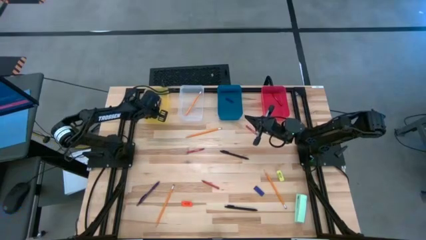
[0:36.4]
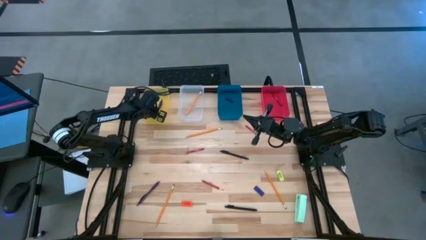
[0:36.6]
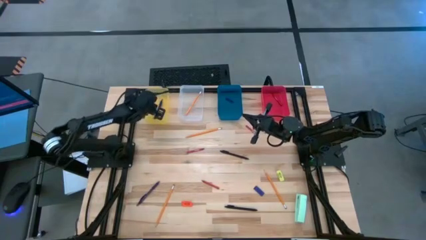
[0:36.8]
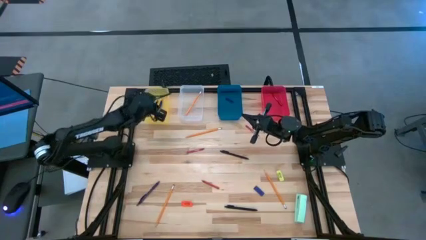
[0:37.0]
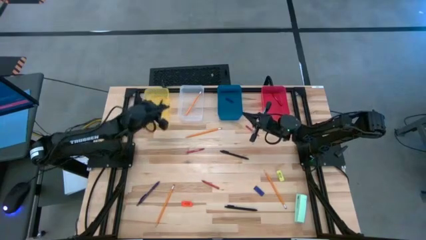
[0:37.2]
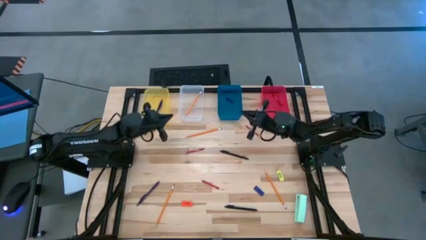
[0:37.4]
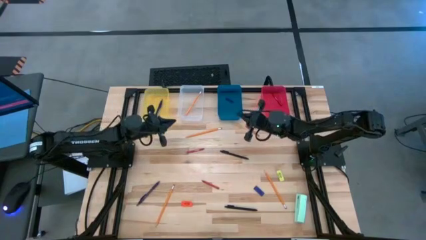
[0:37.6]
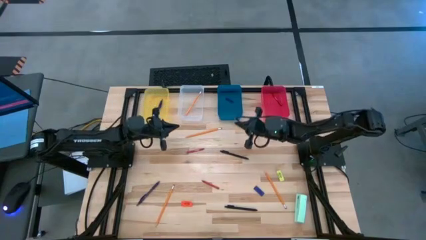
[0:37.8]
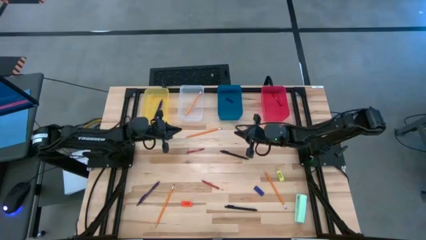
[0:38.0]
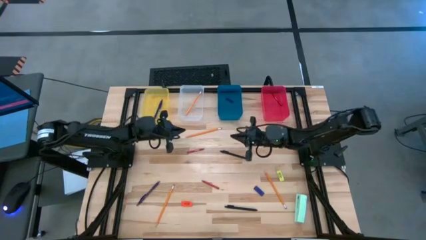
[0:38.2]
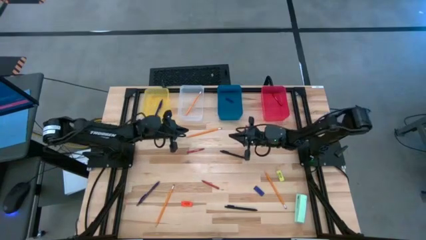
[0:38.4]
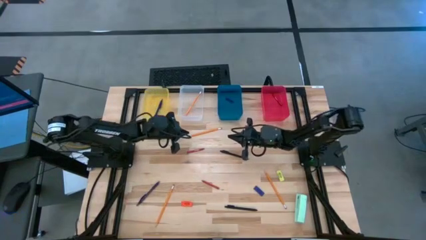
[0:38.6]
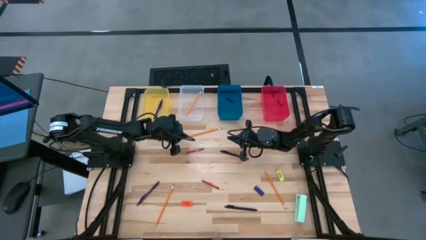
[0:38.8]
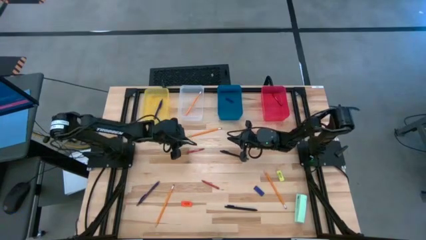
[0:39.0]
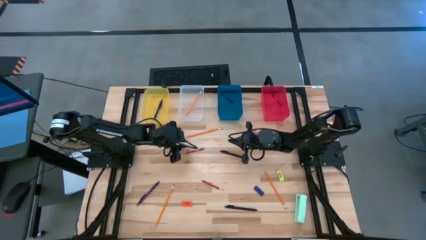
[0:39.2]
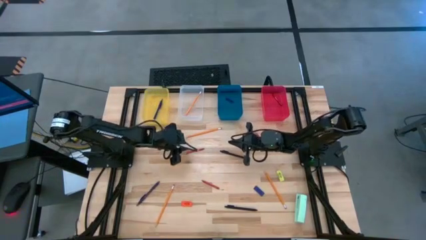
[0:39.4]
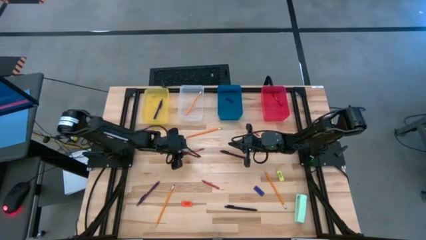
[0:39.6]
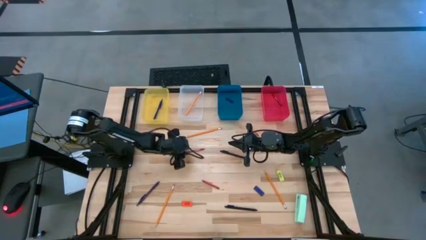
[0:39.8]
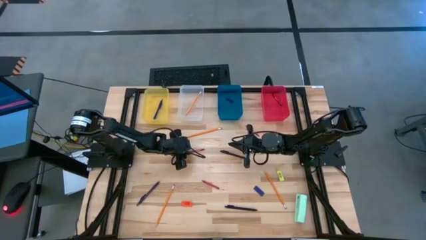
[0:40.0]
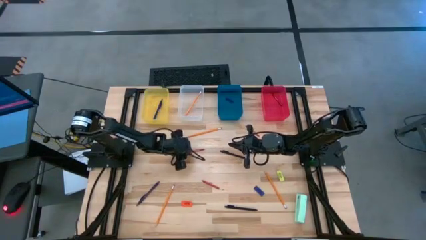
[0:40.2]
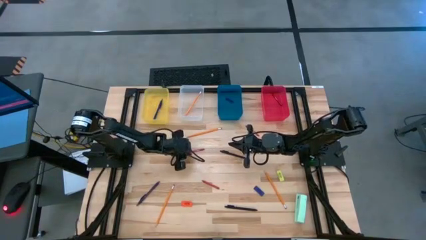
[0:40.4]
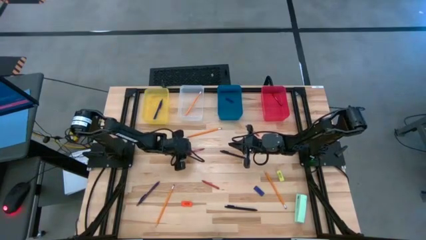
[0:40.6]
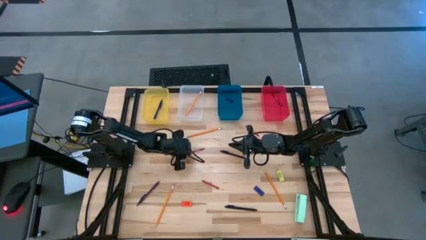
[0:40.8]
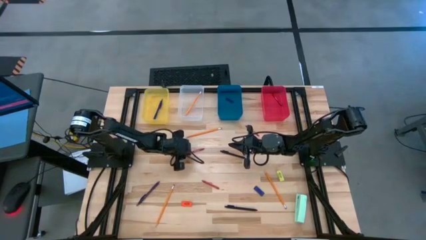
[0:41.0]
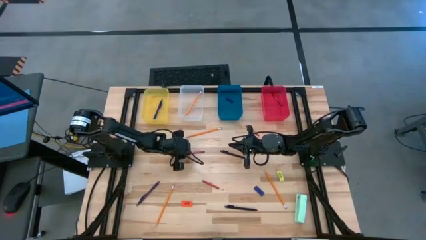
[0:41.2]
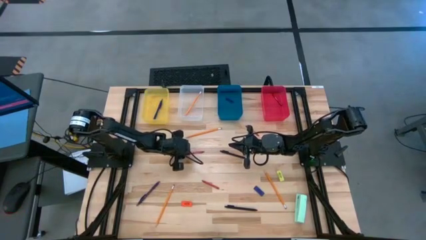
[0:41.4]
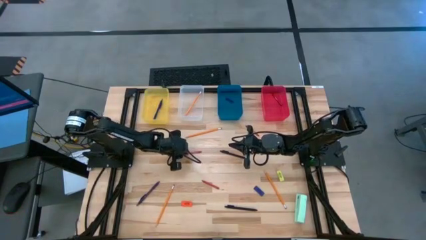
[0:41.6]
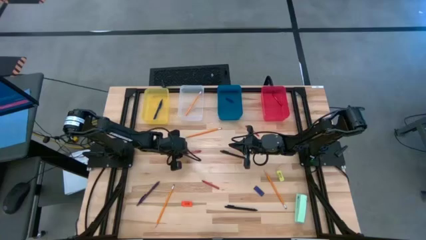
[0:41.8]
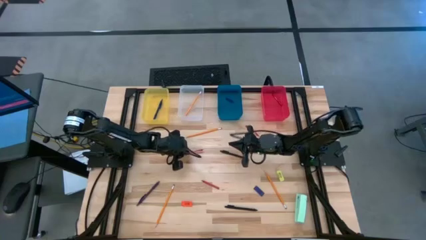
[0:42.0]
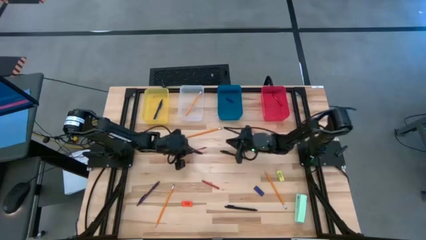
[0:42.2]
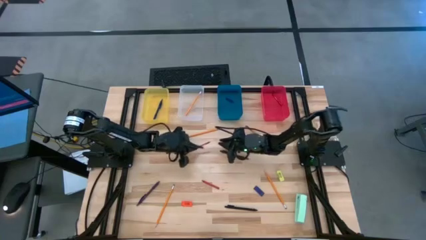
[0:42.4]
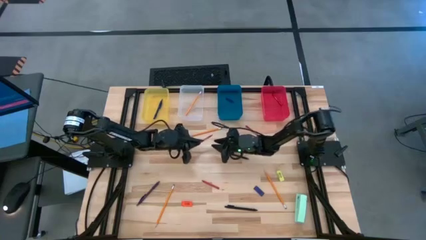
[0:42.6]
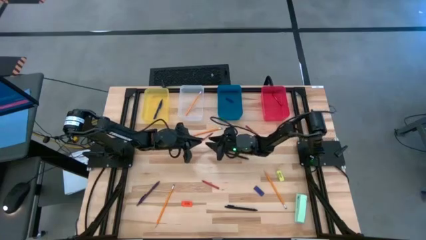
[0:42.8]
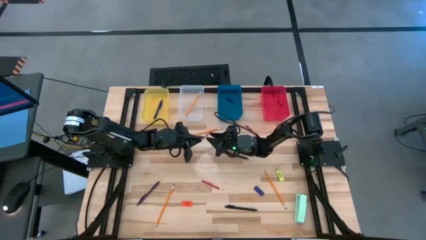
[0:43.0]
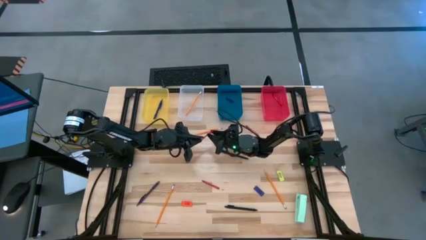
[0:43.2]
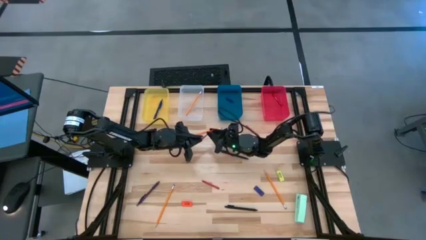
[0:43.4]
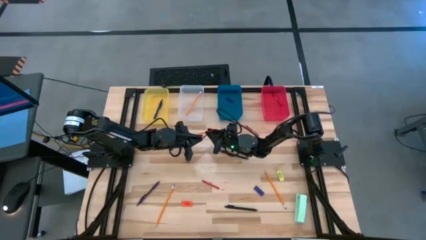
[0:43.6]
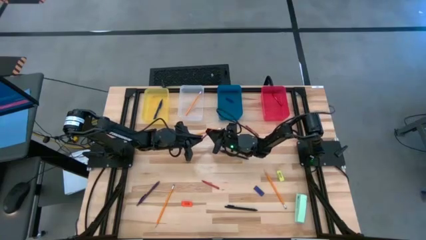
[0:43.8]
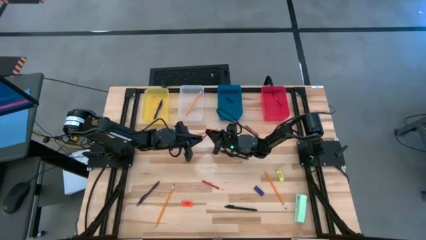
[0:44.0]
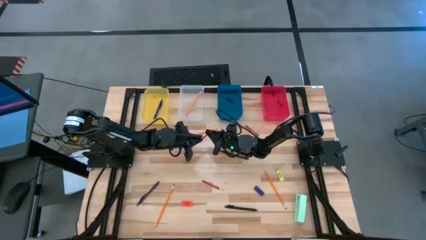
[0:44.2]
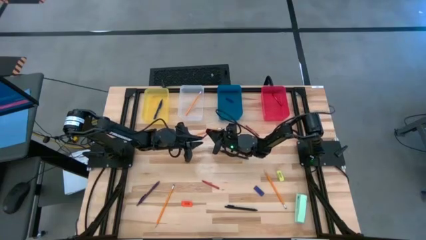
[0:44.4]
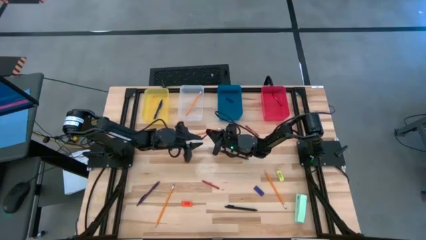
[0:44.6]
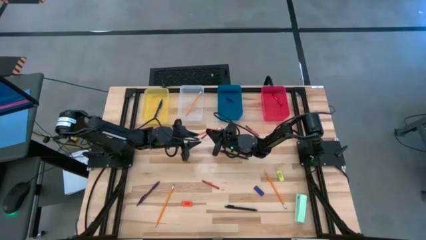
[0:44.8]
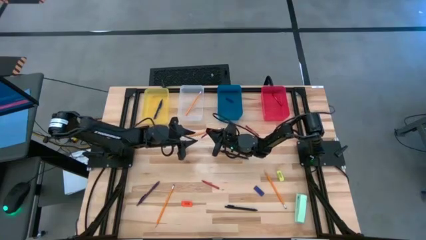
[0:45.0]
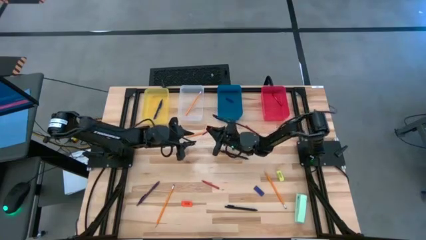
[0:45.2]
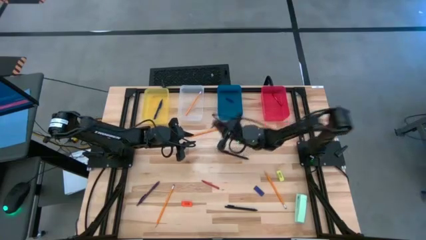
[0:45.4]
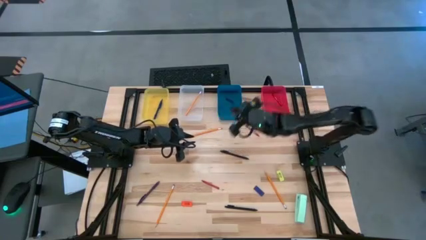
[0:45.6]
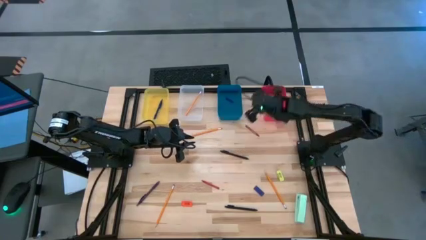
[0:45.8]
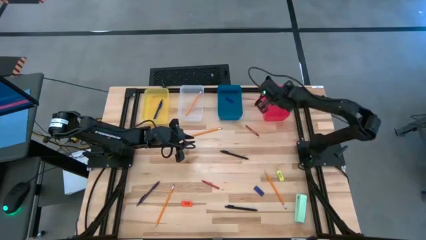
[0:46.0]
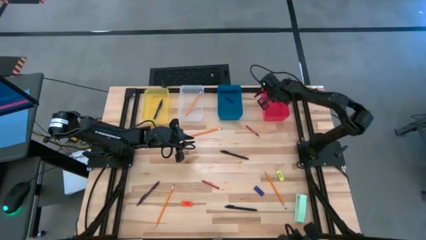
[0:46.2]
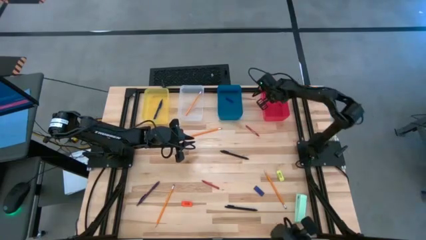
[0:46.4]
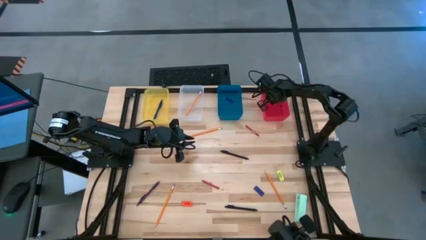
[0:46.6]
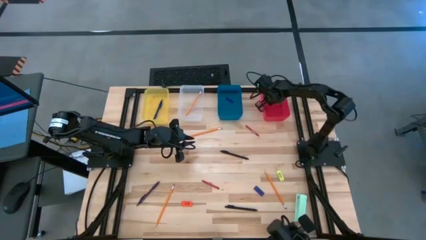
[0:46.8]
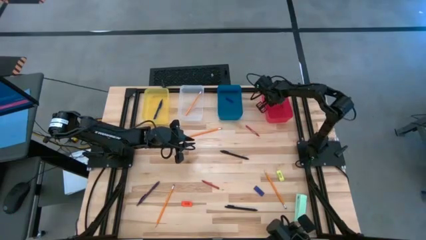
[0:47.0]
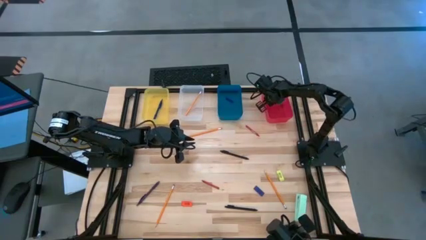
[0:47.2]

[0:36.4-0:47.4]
Task: Sort crayons/erasers/pens/pencils in bins
Put the red crayon into the red bin

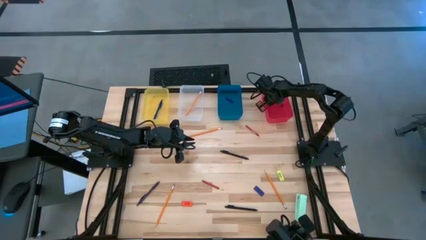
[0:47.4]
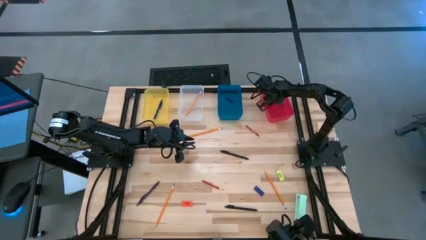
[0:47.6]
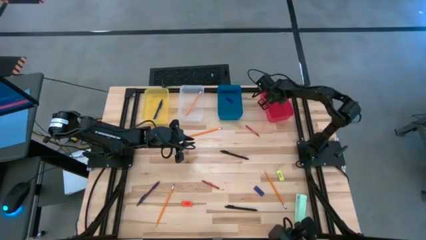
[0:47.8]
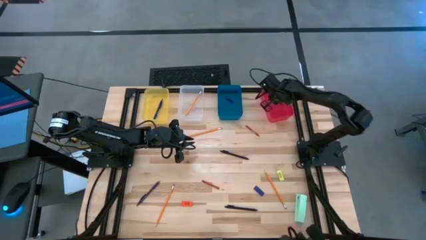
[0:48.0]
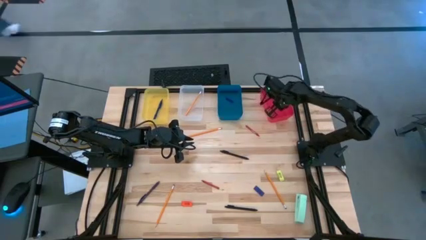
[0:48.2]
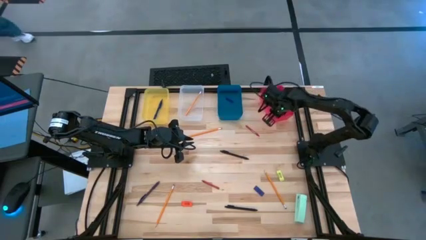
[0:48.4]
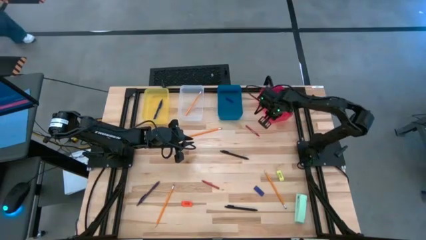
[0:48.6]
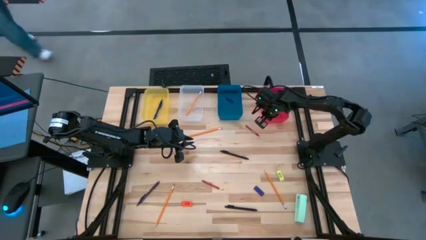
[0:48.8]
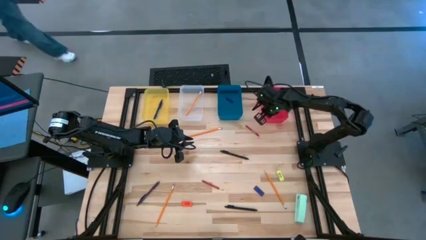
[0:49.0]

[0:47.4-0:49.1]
Adjust the red bin on the table

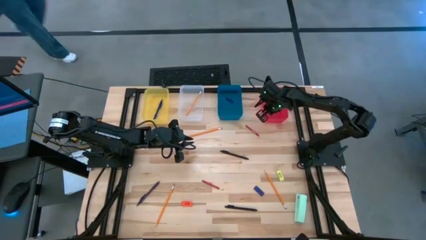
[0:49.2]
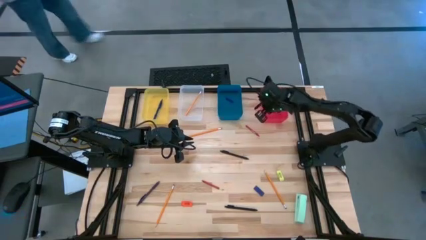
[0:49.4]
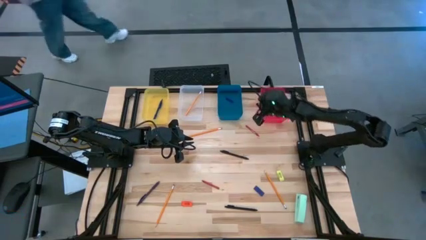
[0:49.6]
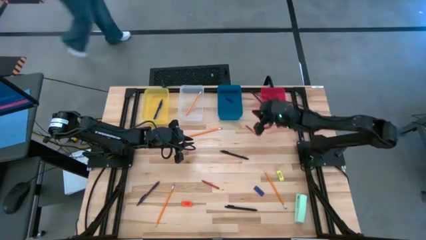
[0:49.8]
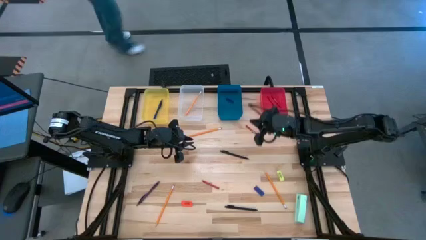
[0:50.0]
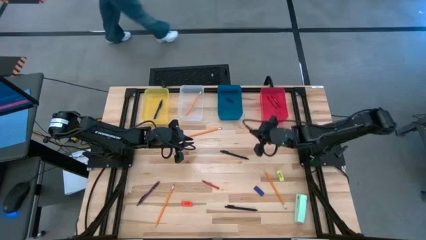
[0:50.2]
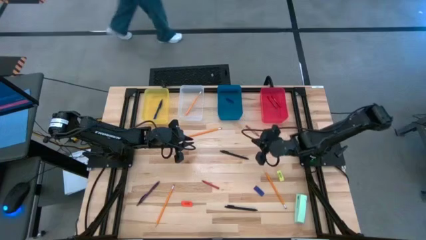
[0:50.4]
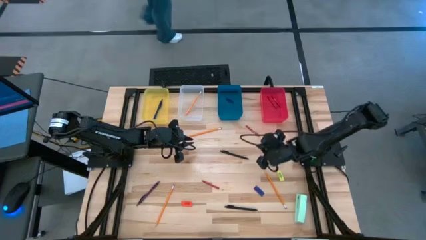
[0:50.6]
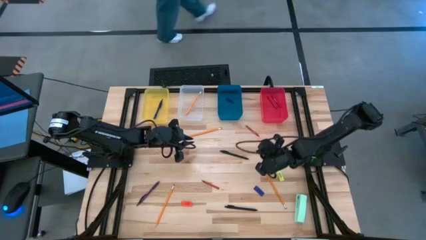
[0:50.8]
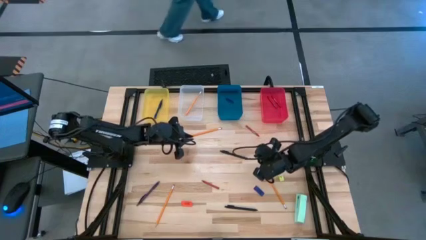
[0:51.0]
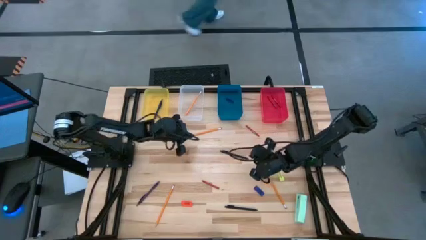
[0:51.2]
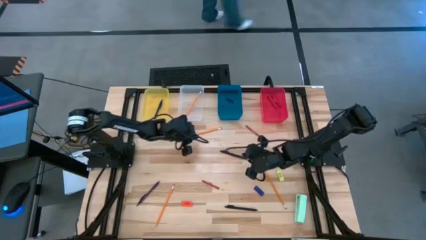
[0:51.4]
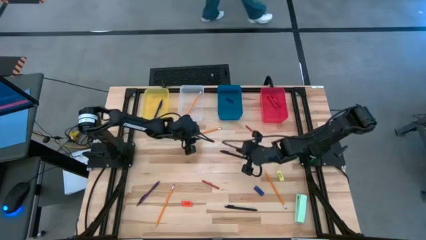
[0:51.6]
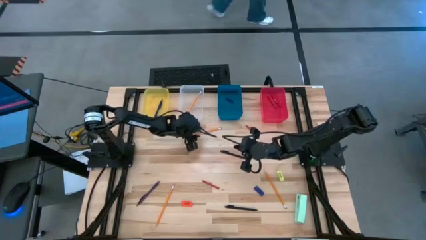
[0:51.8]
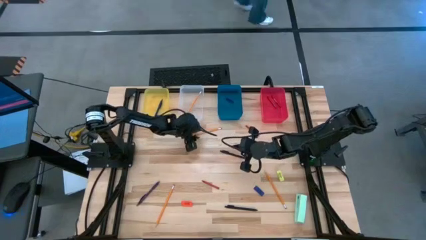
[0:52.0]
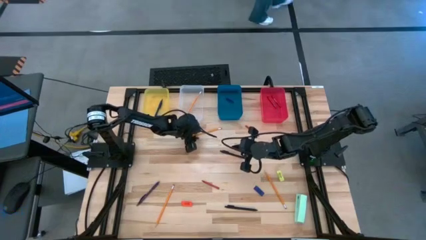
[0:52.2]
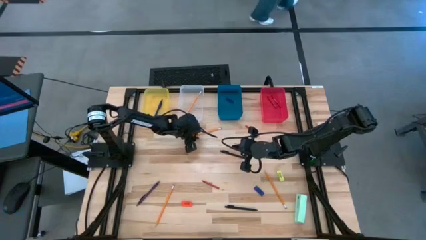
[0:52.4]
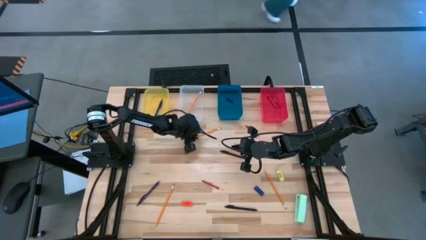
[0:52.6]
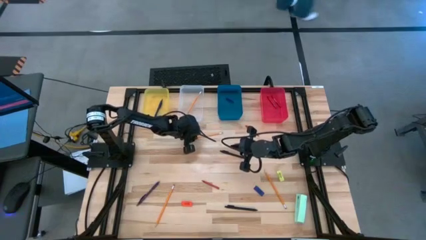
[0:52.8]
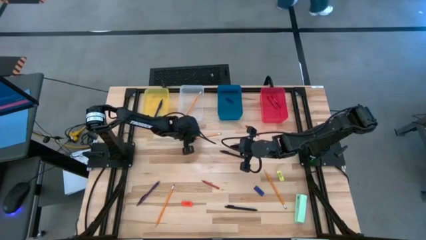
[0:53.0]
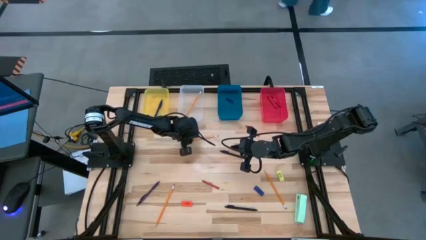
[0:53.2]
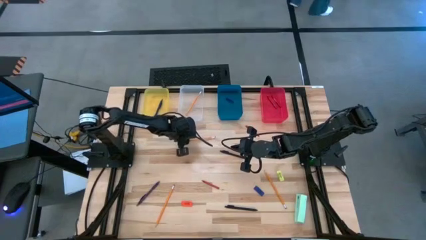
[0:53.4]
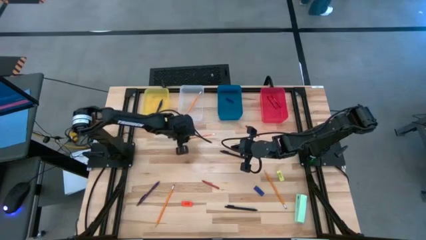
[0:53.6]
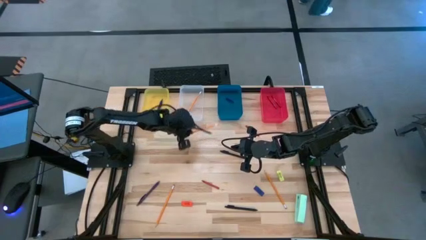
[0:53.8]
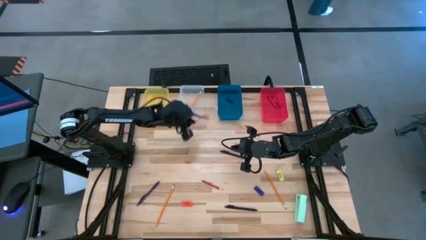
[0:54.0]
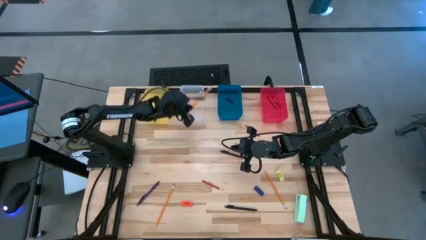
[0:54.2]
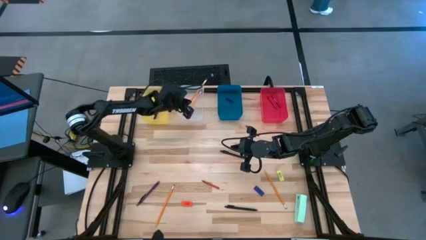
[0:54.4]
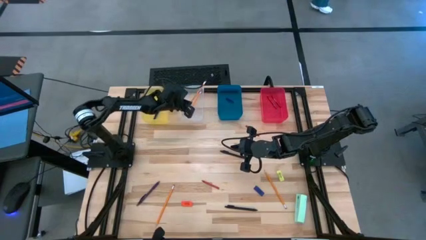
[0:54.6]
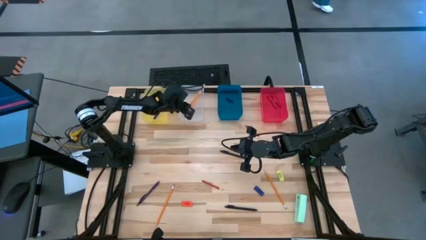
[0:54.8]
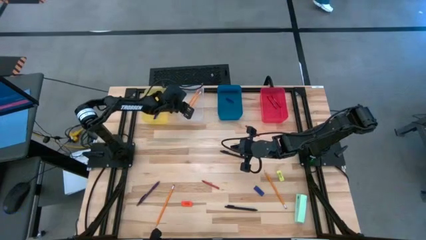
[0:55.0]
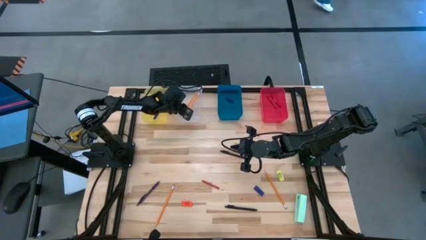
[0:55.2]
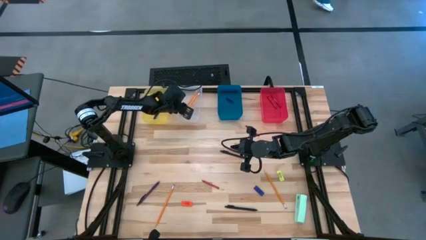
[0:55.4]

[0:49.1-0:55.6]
Put the orange pencil into the transparent bin
